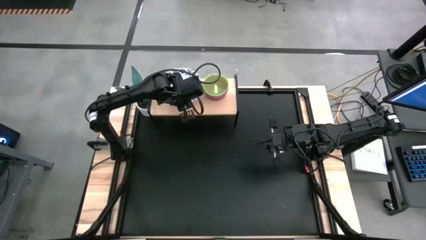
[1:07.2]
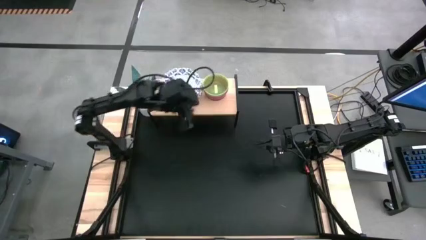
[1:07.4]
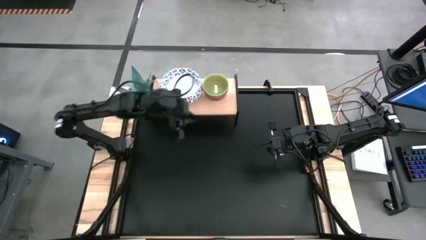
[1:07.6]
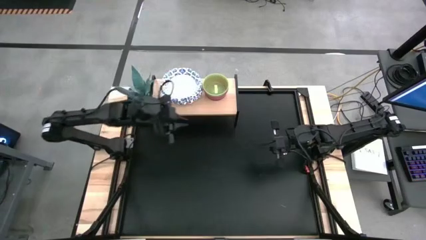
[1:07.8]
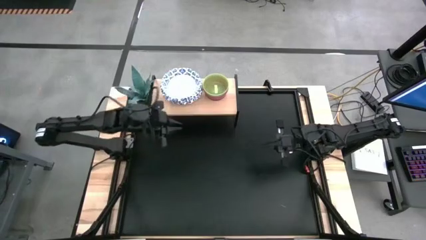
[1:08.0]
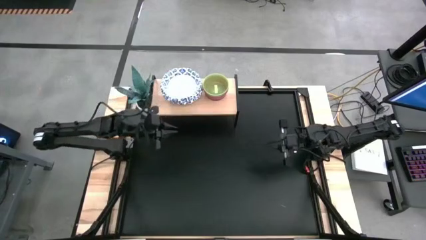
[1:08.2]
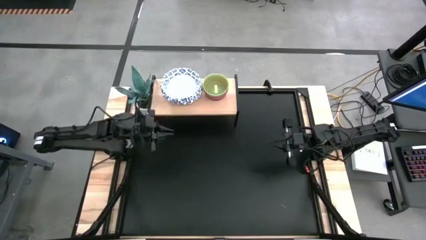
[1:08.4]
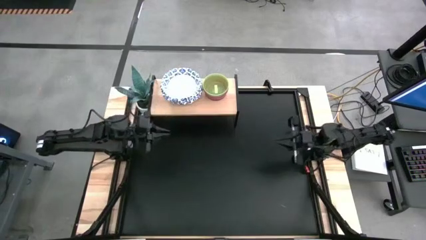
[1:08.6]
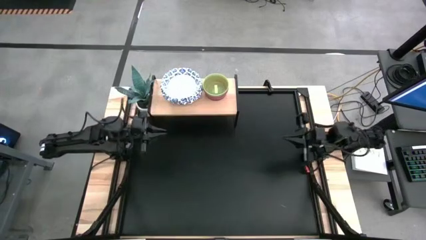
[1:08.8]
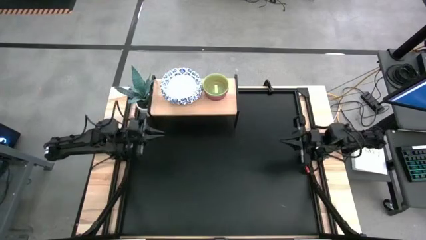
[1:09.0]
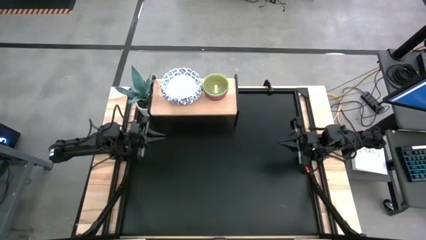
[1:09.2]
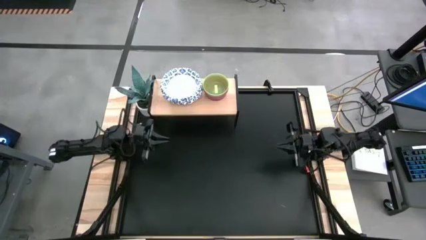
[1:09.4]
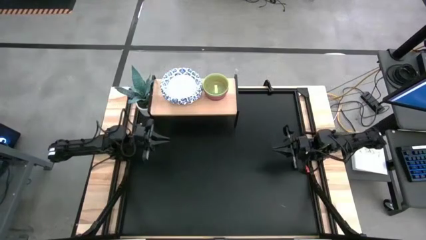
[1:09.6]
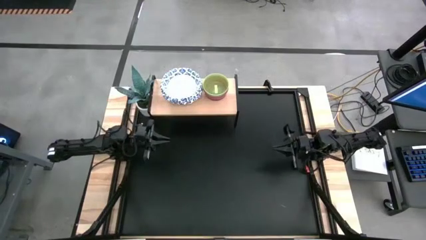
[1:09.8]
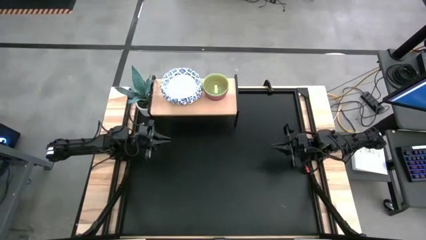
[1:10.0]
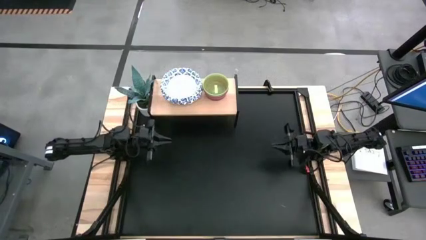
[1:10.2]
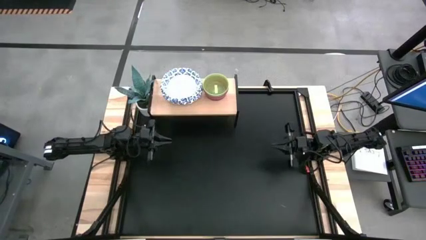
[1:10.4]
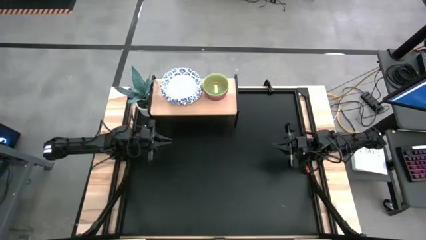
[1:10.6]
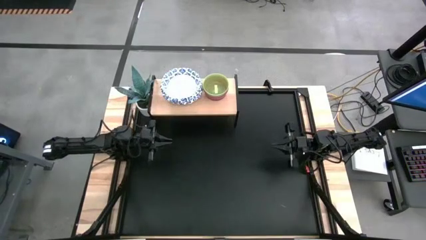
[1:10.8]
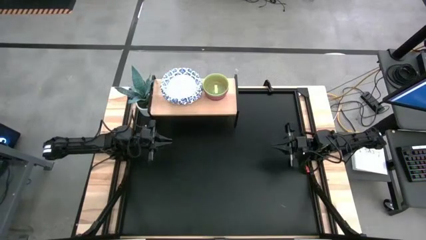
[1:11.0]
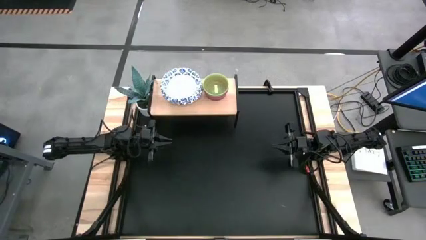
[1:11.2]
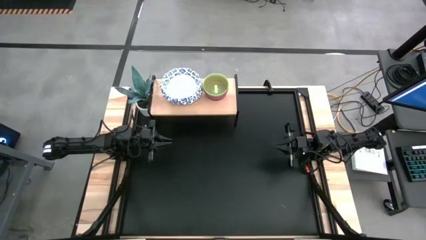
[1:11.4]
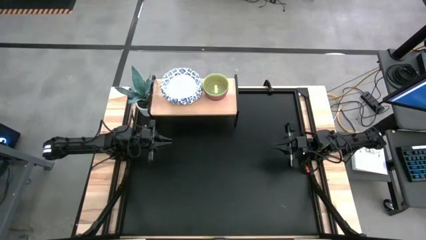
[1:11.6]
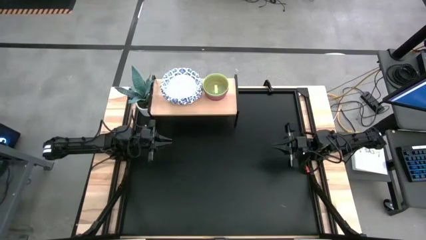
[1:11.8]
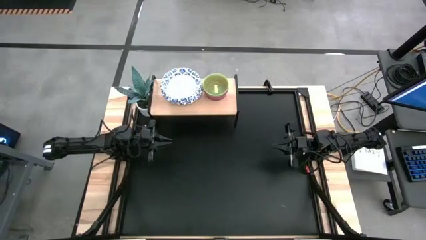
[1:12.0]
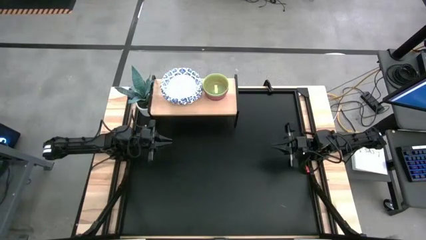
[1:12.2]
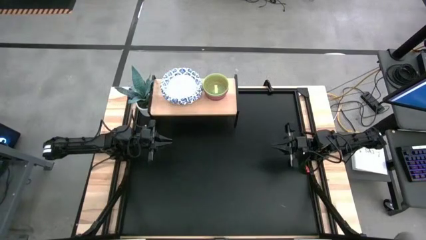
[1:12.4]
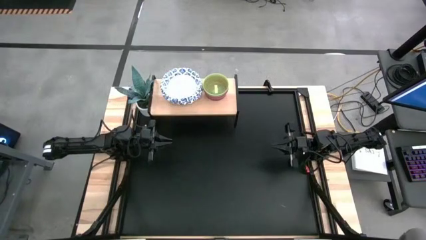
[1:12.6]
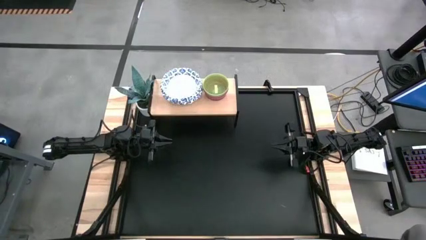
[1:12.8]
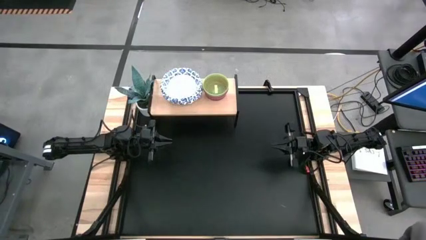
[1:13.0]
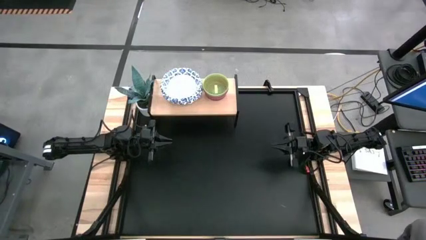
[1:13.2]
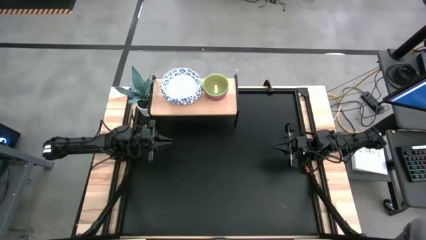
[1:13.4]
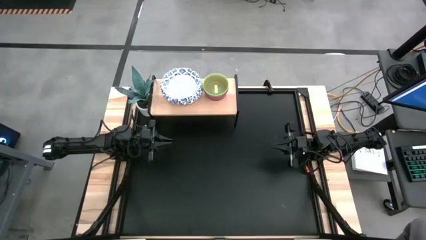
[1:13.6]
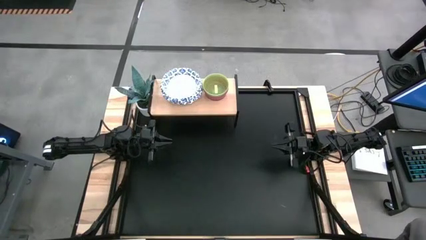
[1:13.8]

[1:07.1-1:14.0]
Task: Place and stack bowls onto a shelf
Return to Home Position

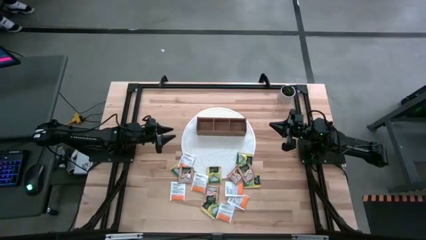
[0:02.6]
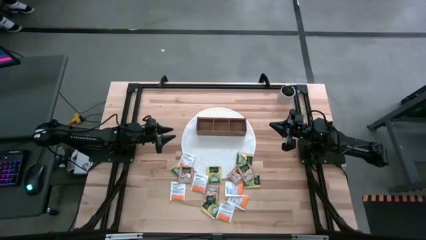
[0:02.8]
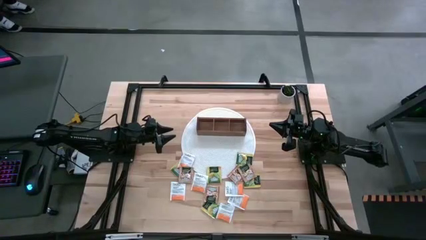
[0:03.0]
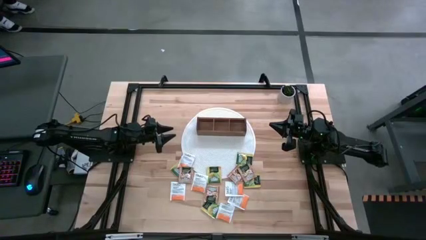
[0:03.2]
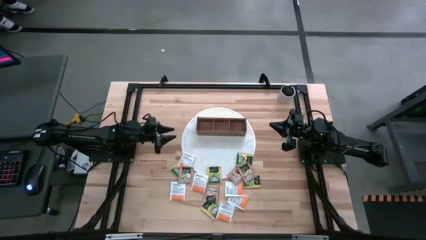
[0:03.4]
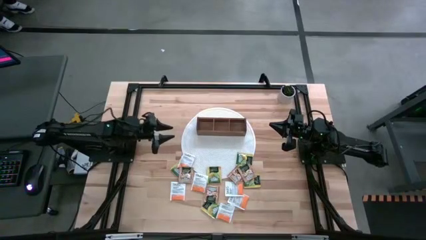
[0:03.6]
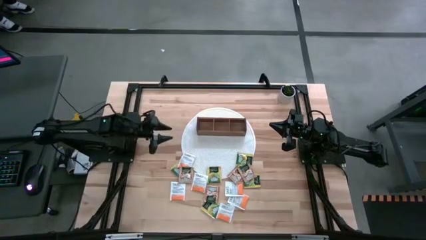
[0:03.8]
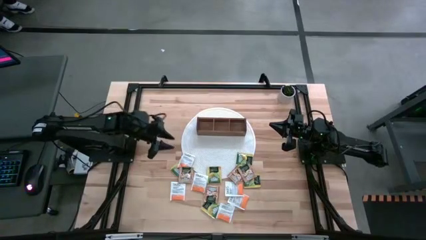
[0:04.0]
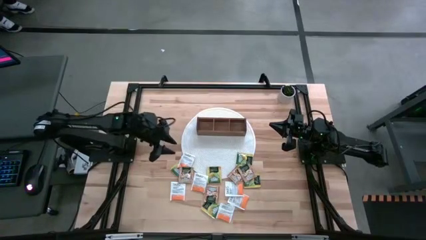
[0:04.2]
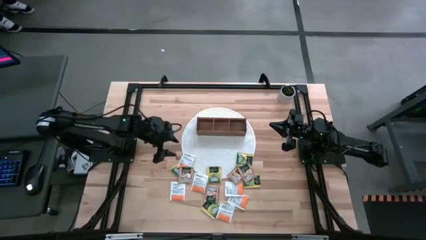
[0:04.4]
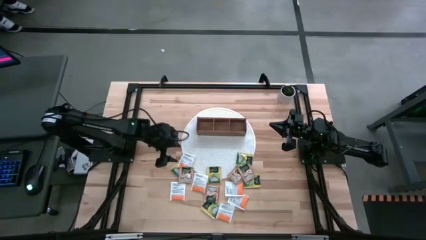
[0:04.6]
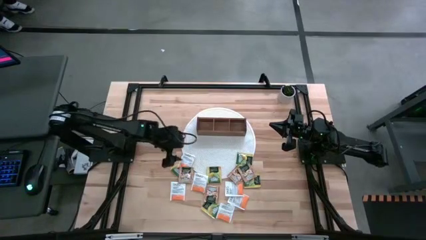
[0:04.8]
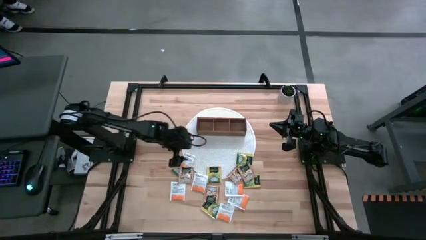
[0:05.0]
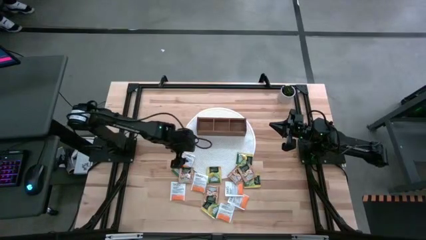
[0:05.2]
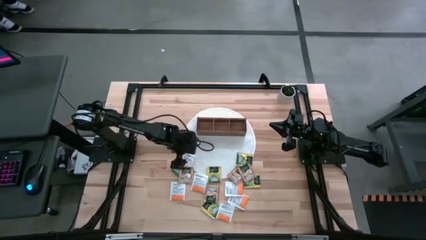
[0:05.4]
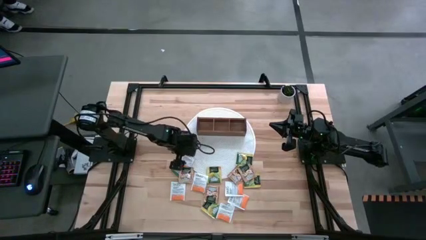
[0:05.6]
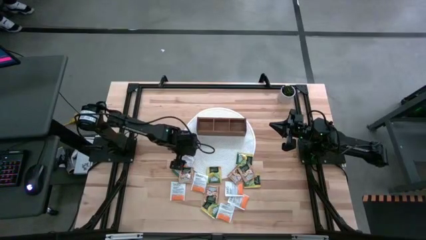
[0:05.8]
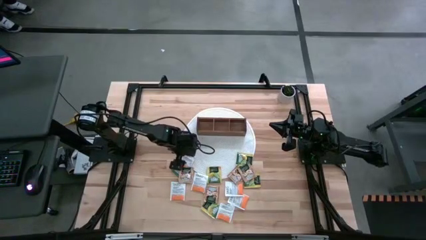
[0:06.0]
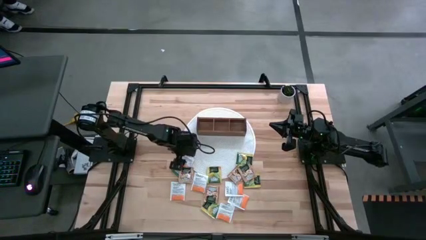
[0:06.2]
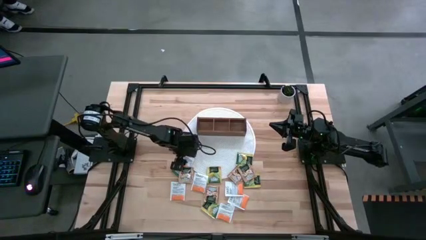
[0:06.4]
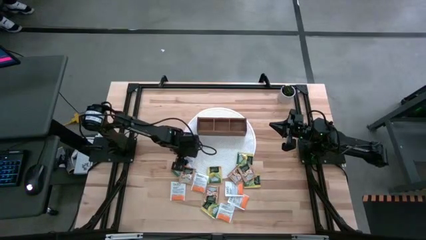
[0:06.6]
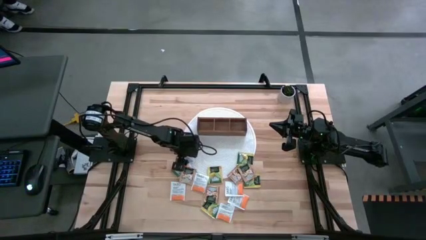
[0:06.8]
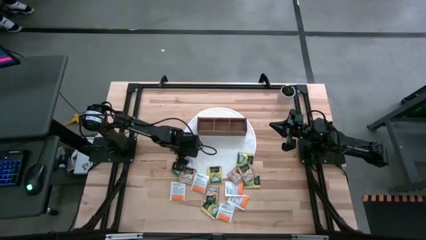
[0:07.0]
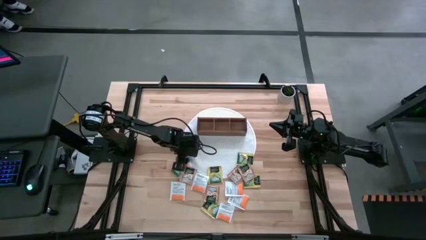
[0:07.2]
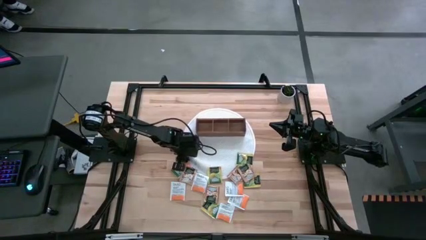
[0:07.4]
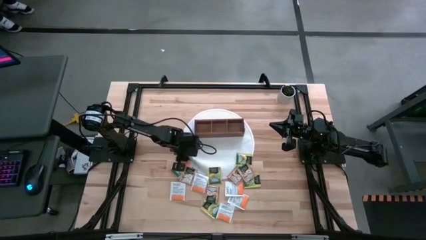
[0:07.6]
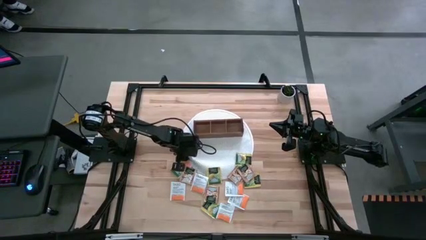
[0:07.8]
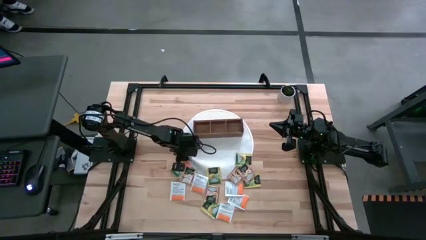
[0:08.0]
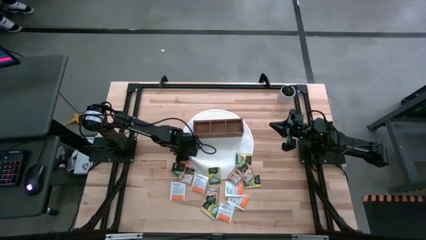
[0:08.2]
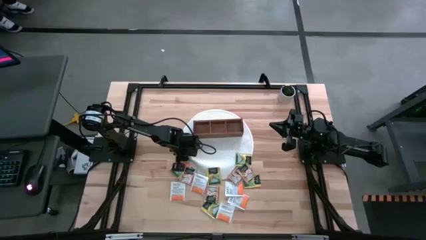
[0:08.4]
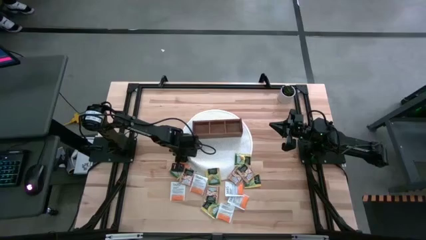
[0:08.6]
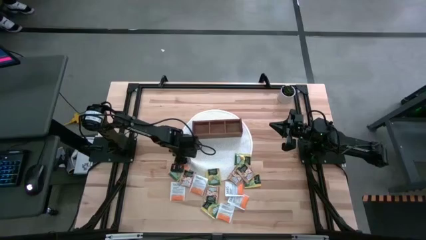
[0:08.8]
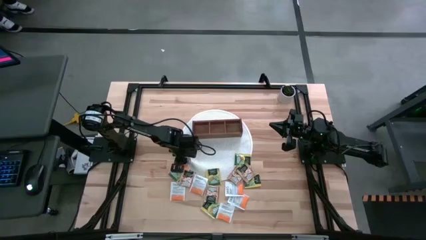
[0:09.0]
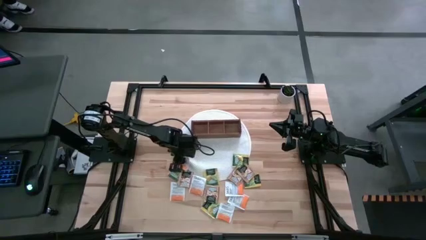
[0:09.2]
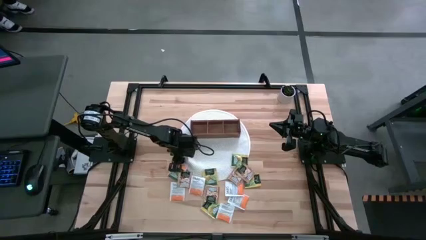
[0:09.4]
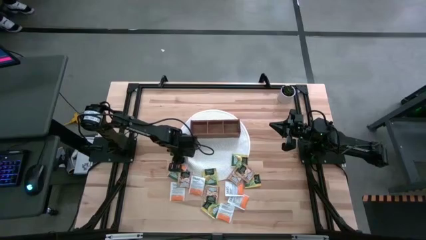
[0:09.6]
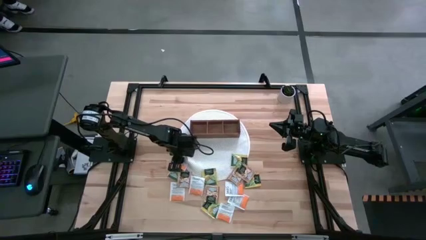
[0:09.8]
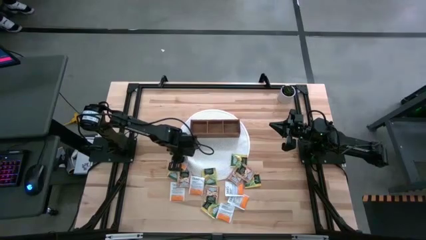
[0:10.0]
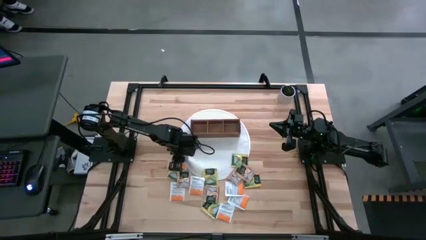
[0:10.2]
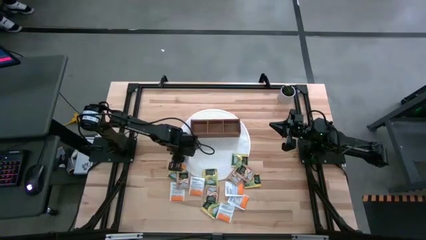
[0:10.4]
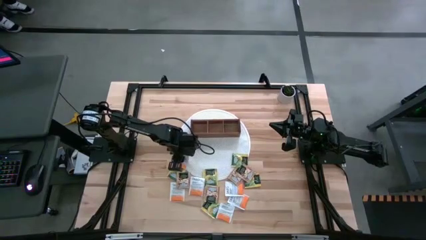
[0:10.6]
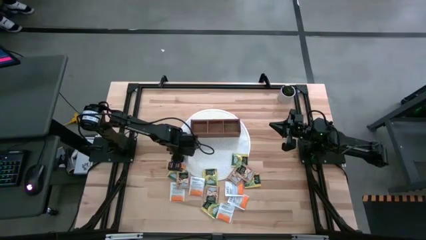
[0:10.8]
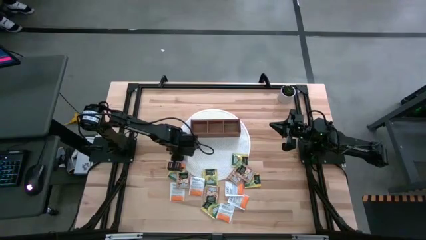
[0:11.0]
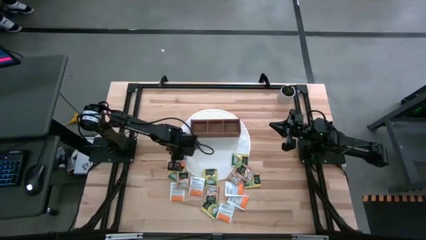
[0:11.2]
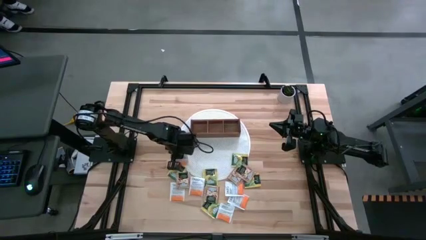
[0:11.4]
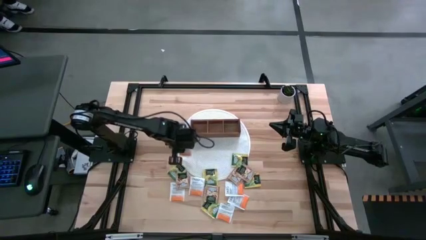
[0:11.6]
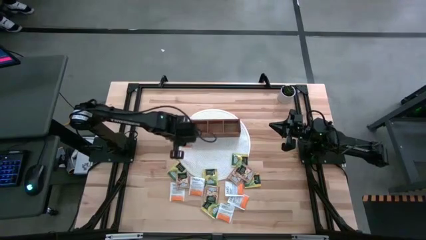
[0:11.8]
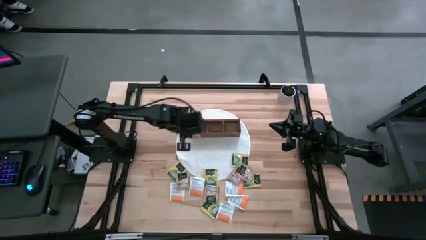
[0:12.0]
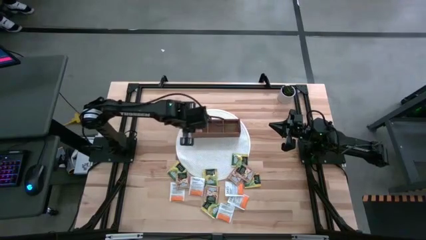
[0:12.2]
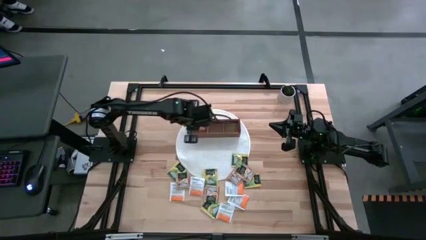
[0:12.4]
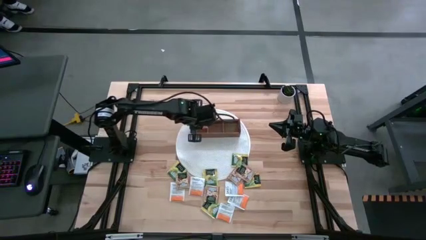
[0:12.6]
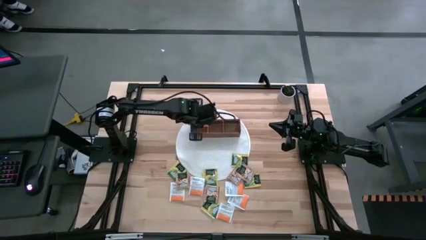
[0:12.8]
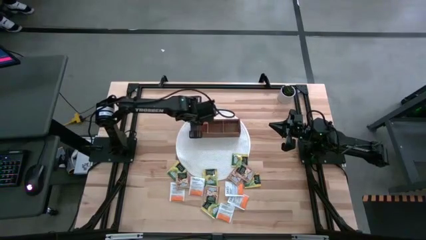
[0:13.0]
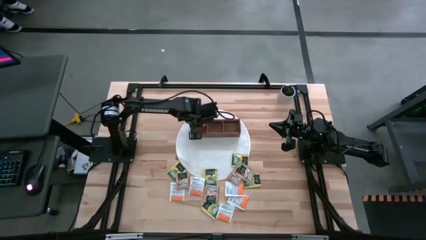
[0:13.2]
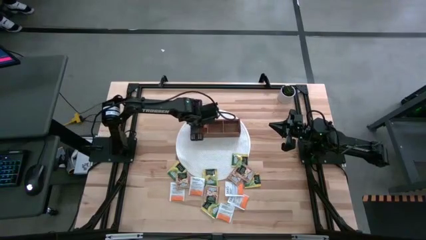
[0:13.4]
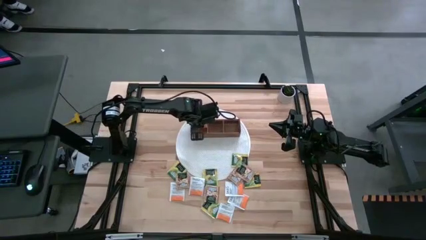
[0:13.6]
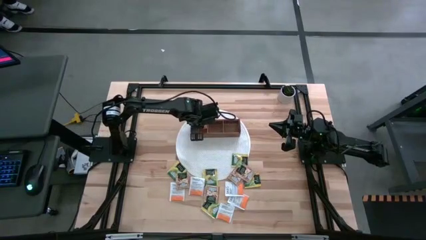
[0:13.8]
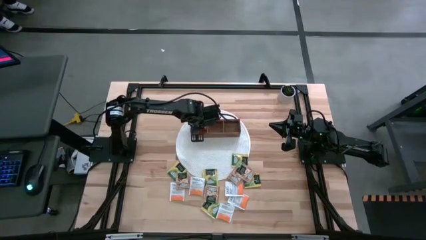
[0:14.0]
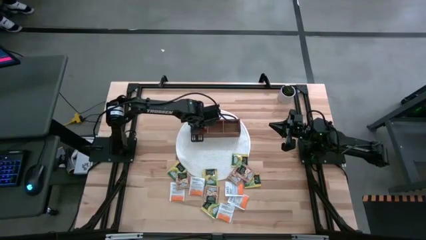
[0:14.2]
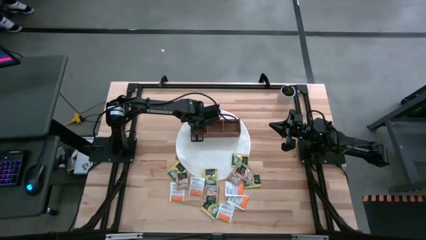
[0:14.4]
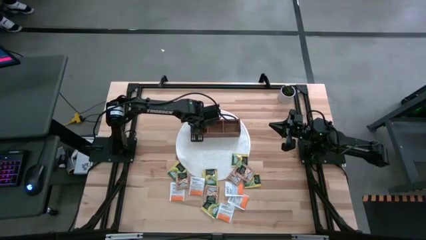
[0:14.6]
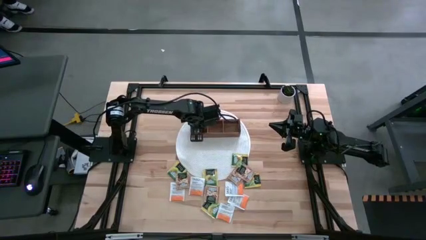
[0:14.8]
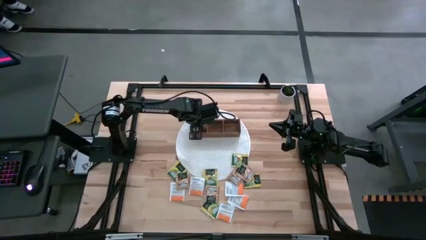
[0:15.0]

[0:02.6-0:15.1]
Task: Pick & Place Tea
Put the orange tea bag into the left section of the wooden organizer
